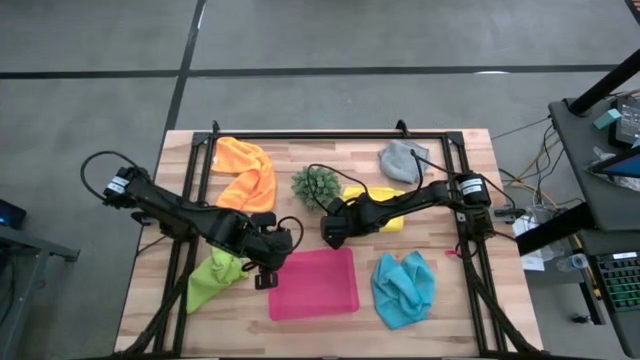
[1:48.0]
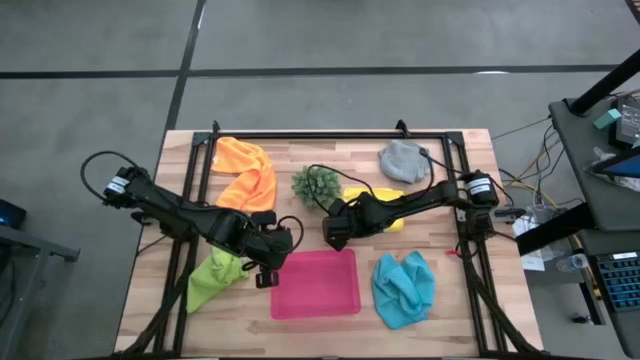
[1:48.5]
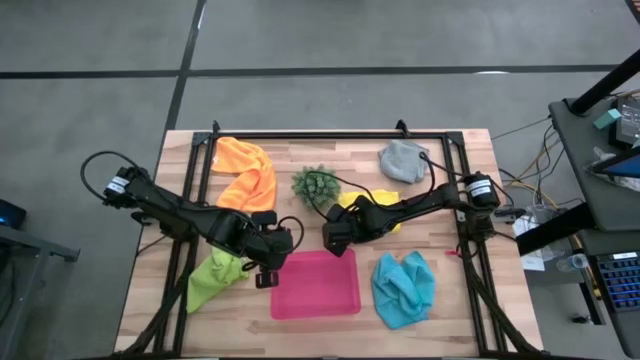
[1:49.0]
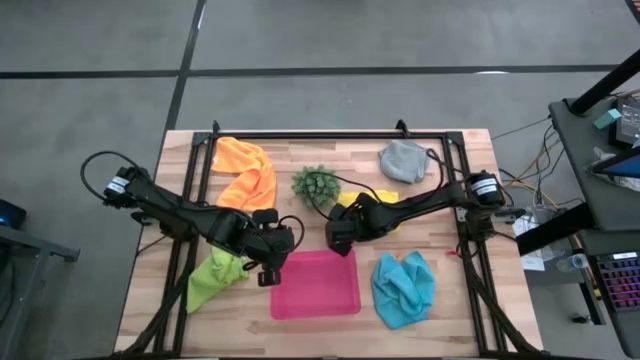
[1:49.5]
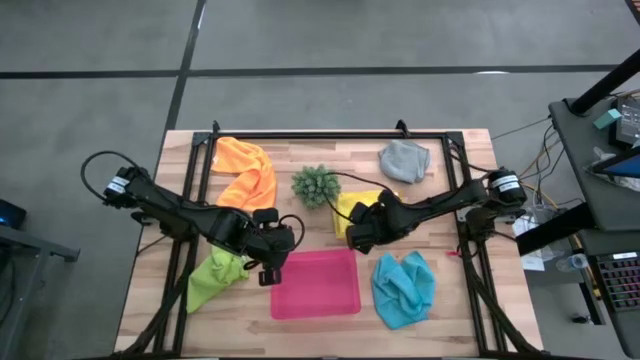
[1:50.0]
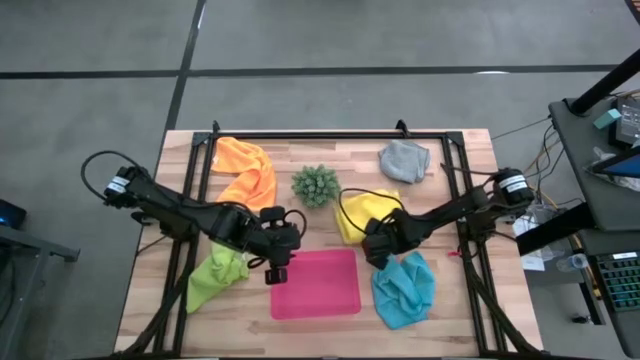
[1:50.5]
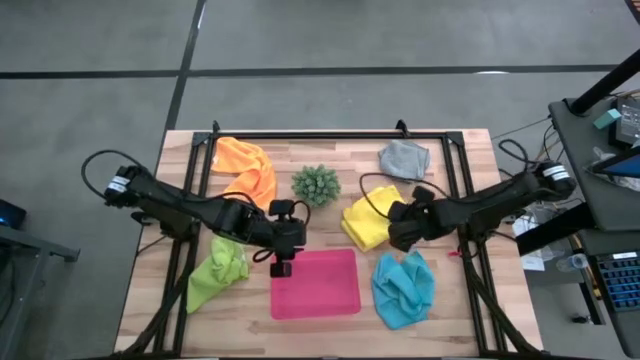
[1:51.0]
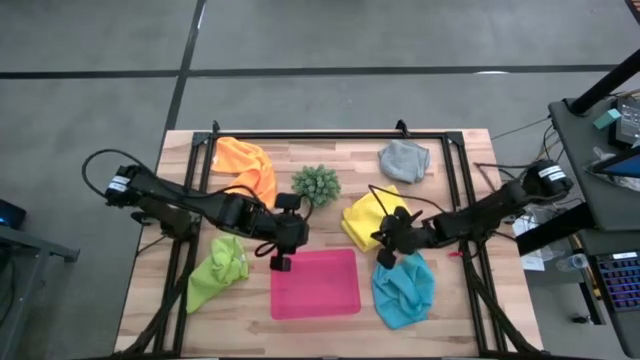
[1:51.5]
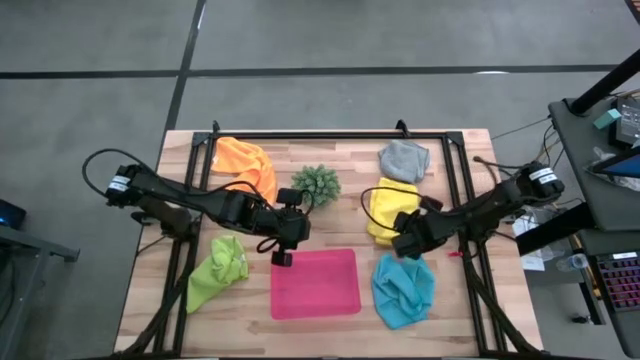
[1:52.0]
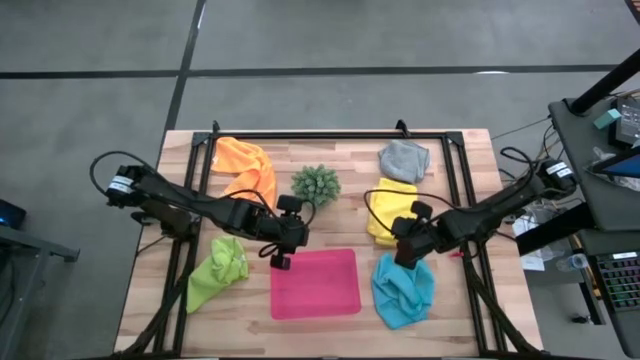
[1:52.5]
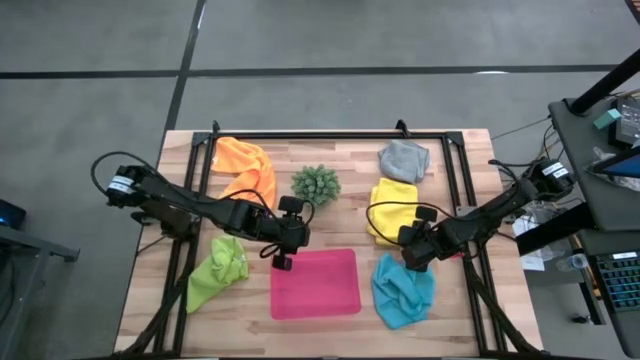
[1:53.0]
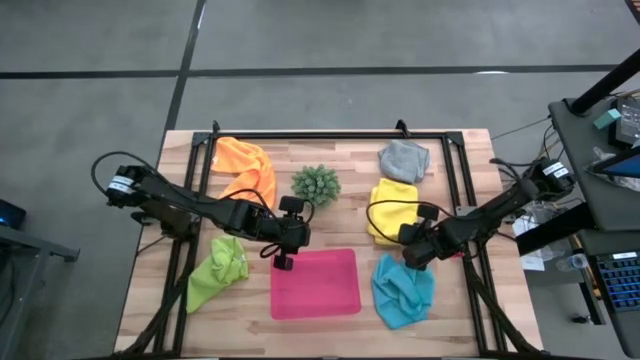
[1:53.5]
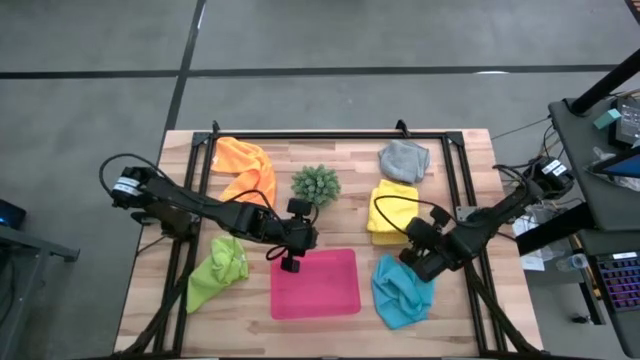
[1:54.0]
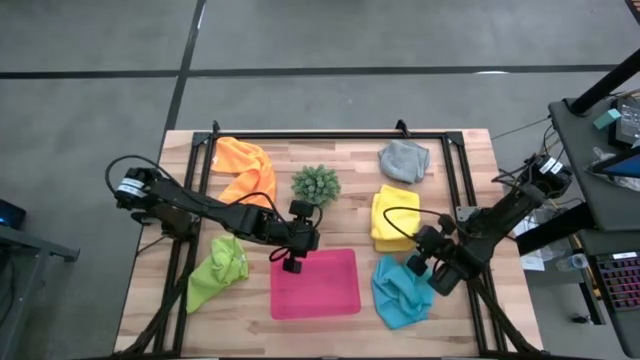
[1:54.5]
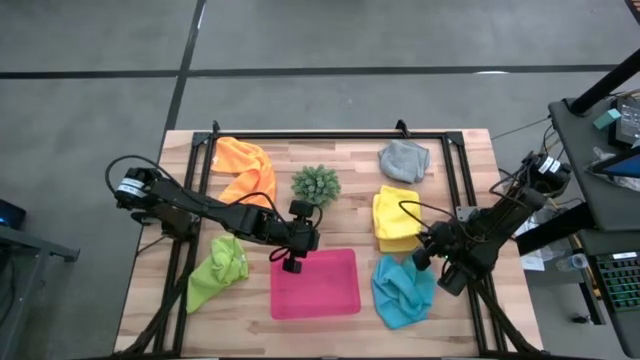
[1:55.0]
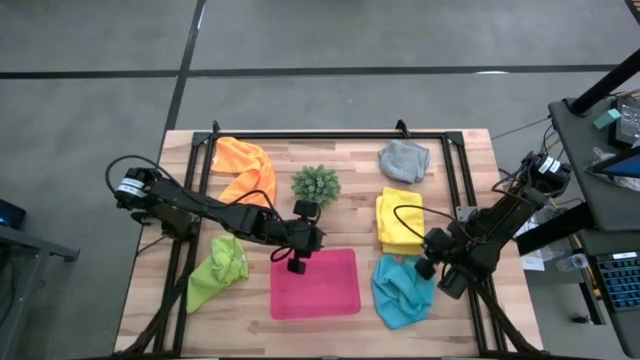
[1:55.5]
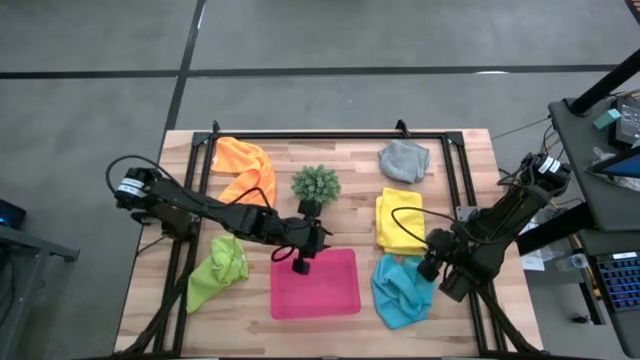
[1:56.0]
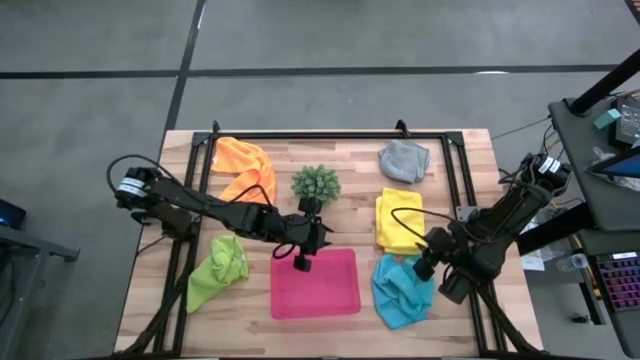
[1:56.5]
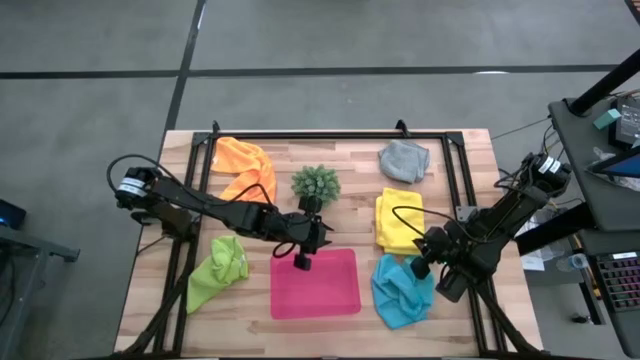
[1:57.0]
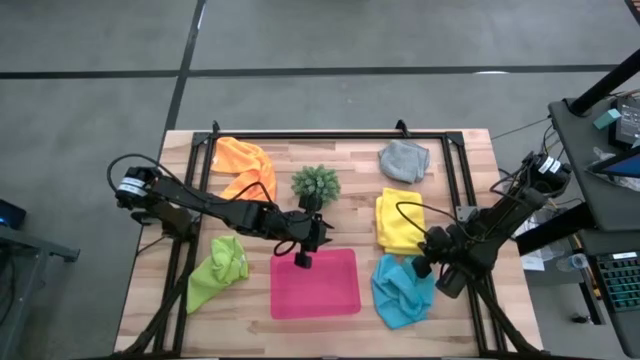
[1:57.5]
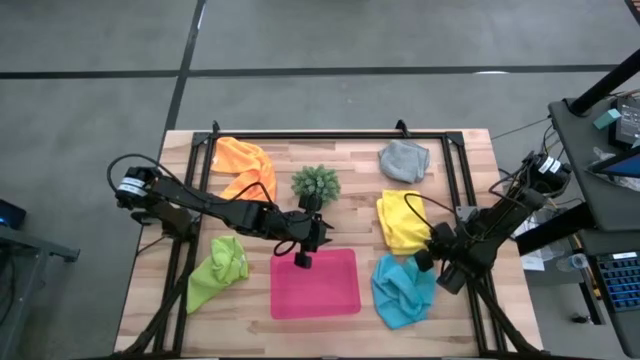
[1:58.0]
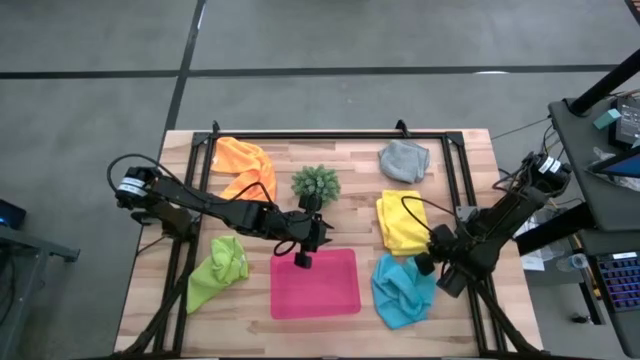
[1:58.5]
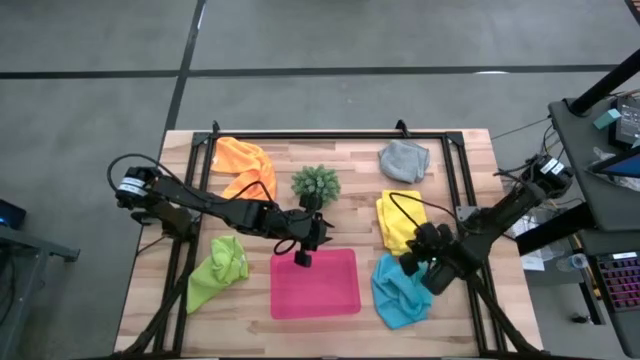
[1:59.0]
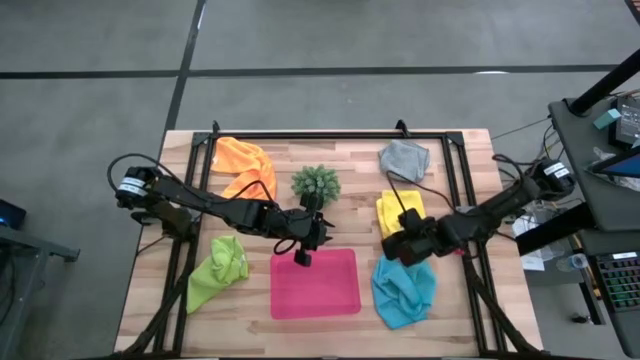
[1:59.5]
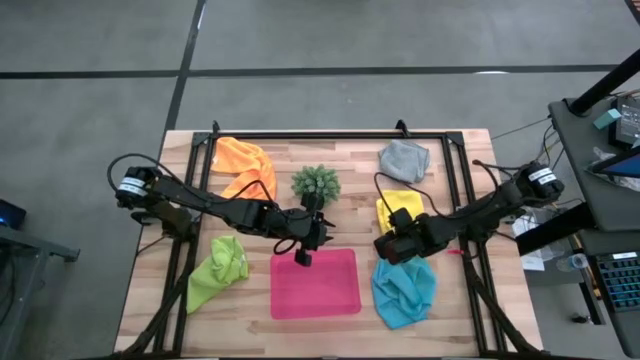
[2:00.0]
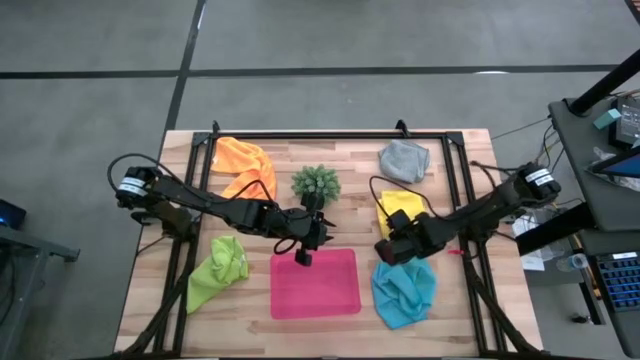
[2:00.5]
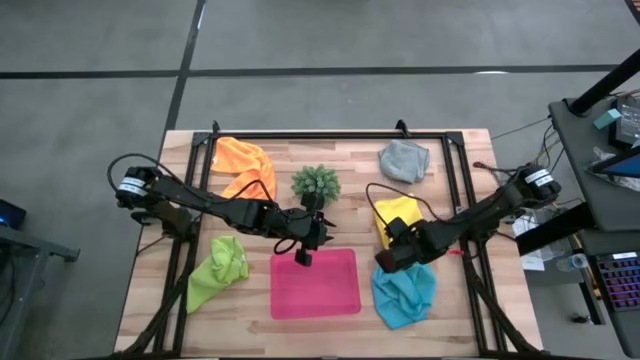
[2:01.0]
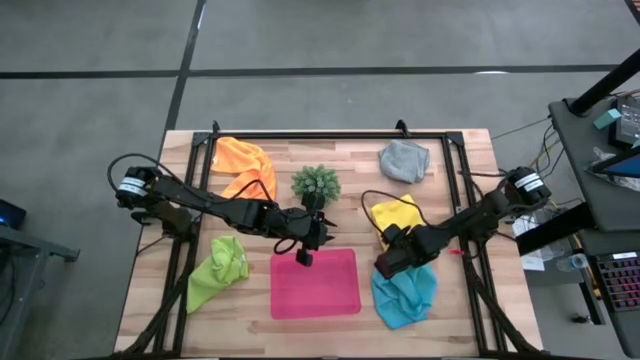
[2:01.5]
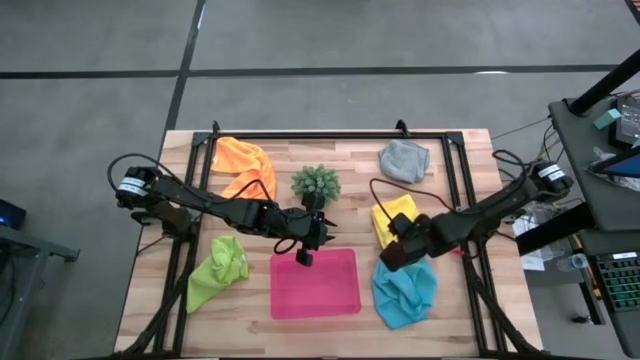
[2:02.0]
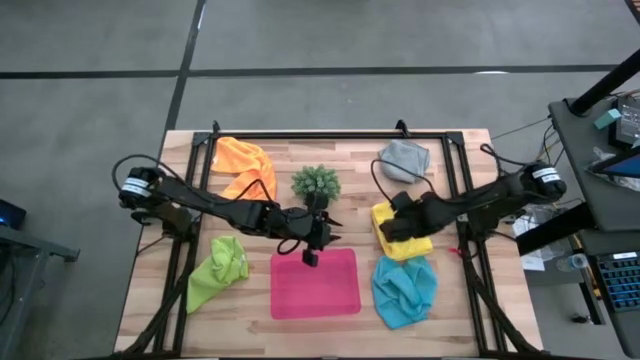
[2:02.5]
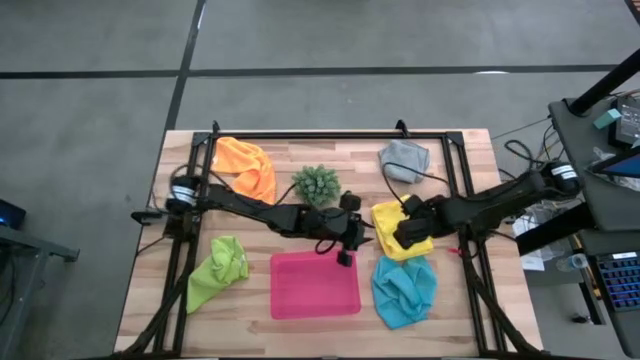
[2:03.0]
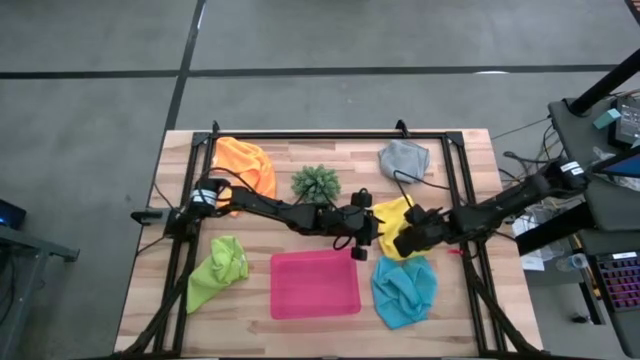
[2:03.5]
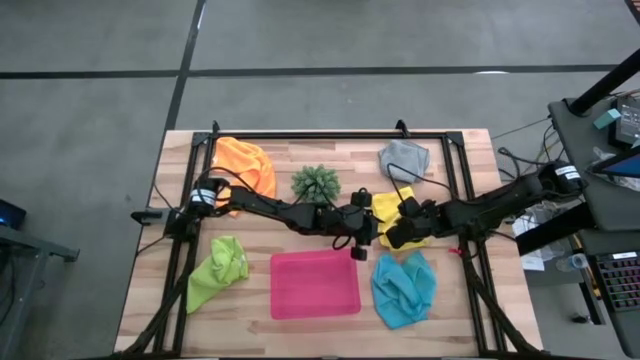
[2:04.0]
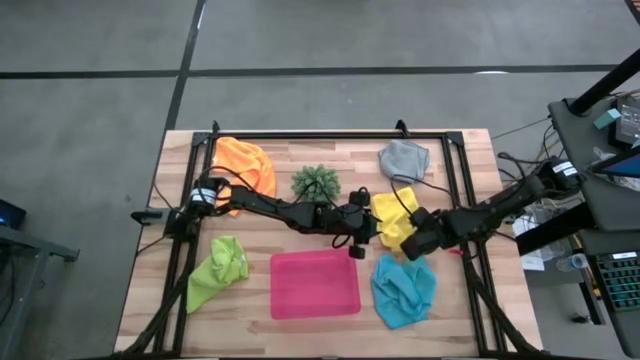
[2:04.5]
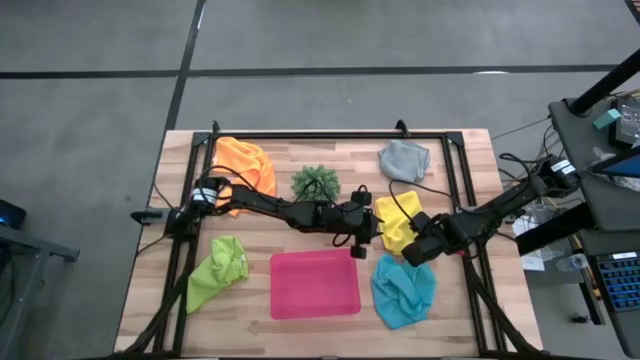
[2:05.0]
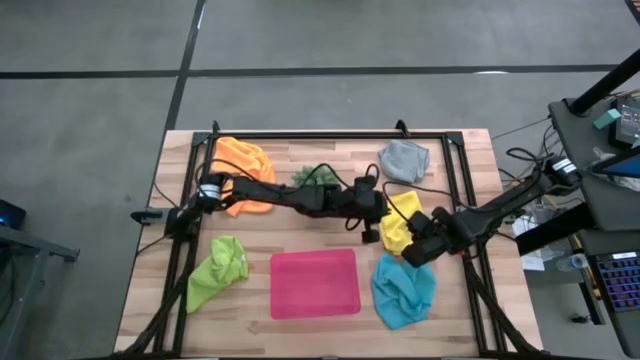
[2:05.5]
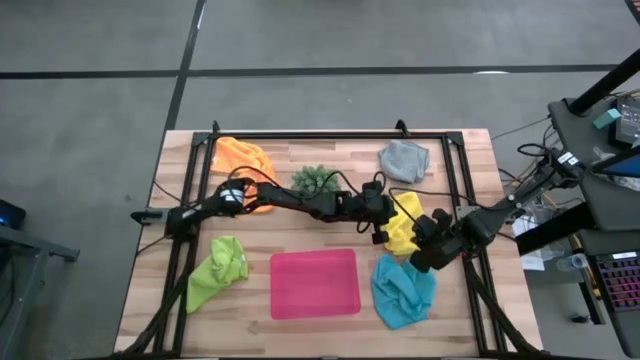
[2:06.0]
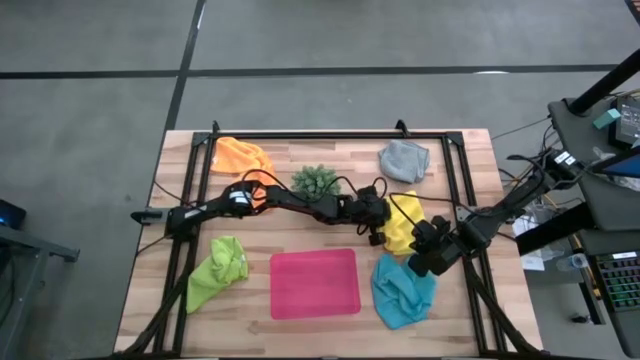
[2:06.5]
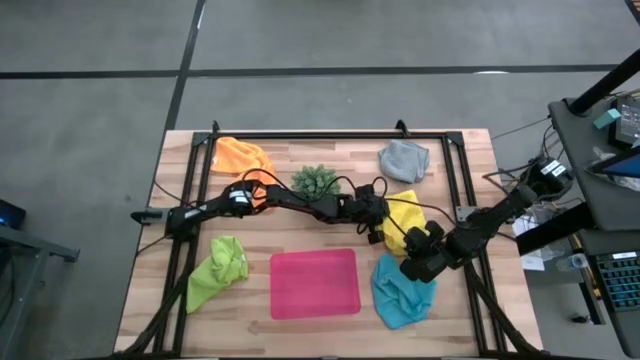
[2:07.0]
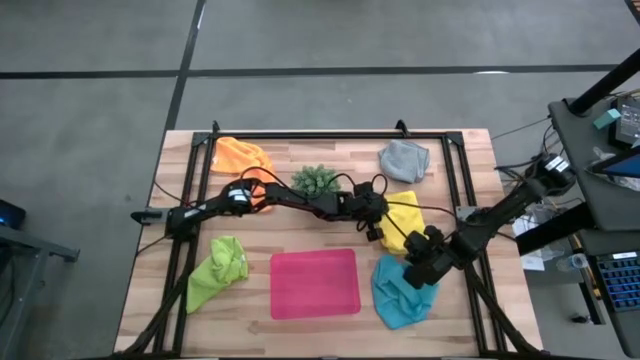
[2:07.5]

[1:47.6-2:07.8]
Task: Fold microfiber towels
Fold the yellow microfiber cloth
